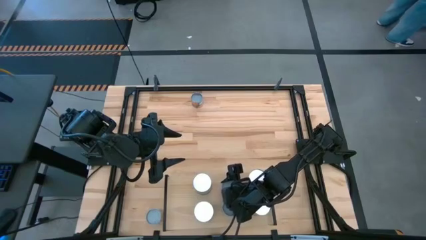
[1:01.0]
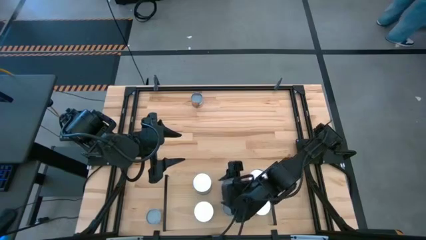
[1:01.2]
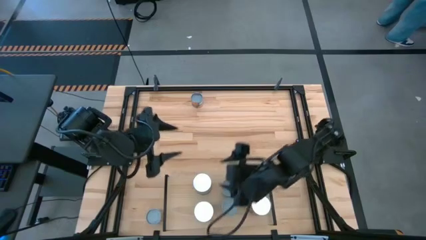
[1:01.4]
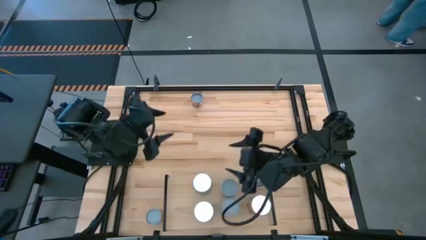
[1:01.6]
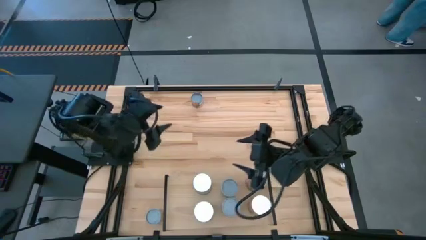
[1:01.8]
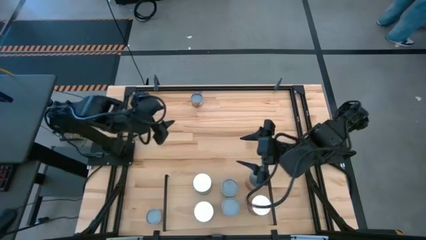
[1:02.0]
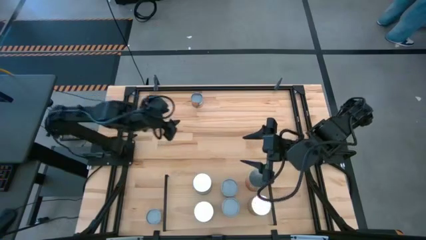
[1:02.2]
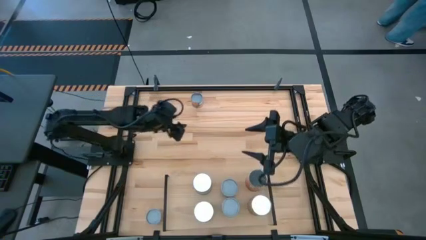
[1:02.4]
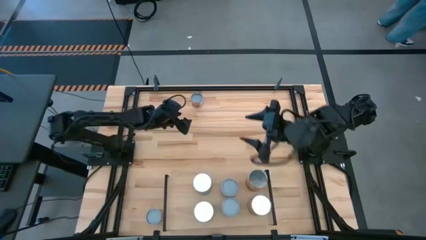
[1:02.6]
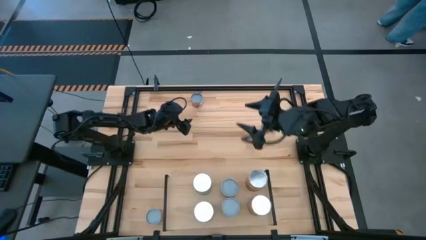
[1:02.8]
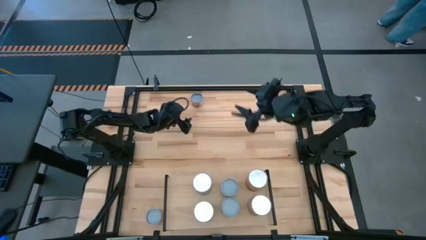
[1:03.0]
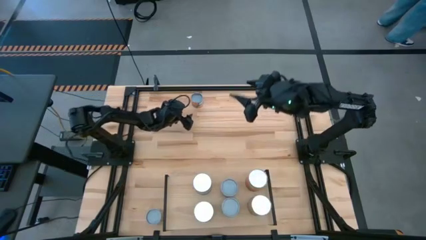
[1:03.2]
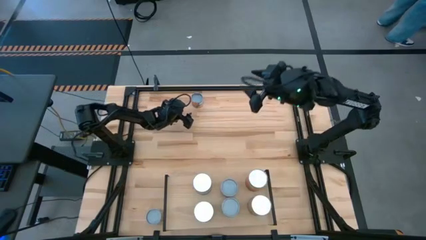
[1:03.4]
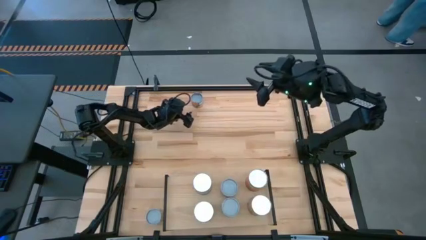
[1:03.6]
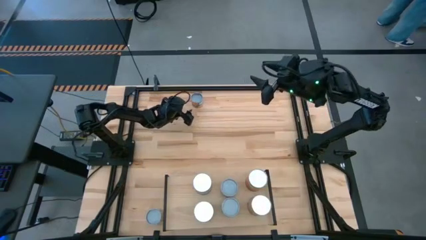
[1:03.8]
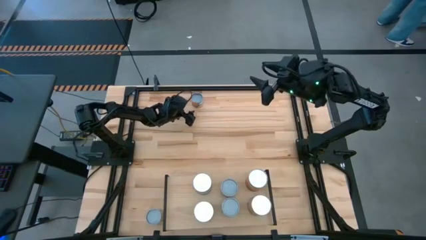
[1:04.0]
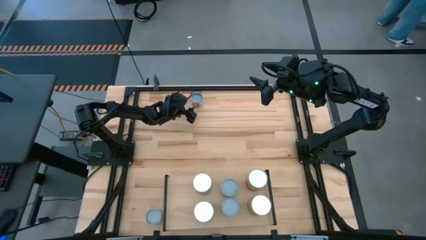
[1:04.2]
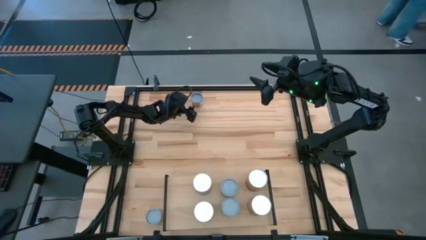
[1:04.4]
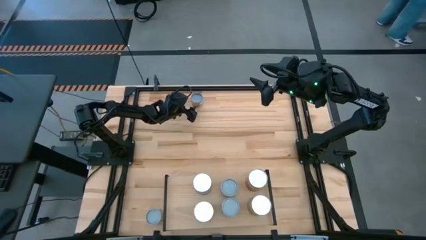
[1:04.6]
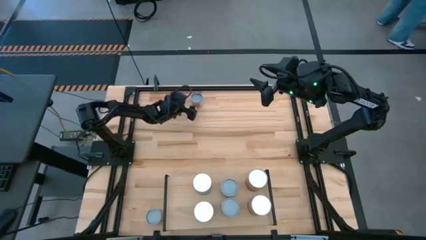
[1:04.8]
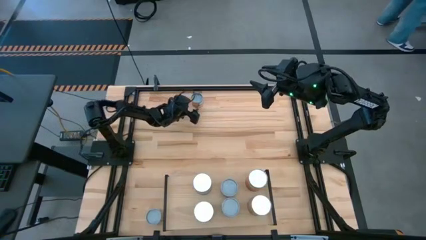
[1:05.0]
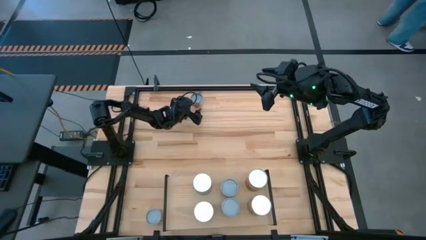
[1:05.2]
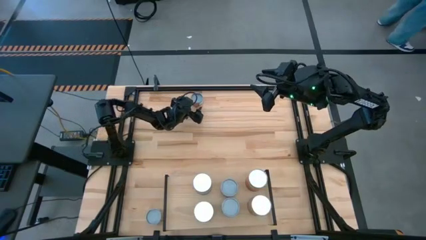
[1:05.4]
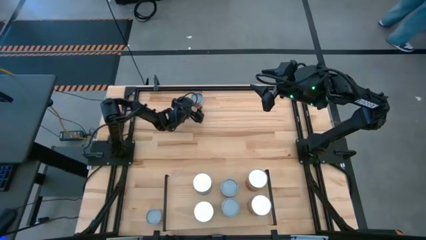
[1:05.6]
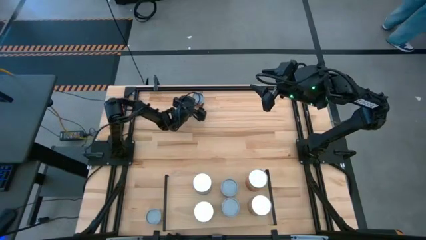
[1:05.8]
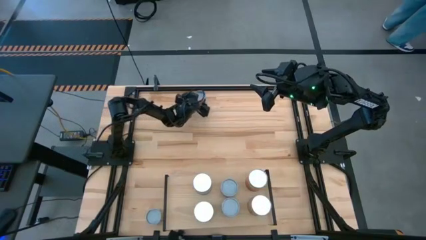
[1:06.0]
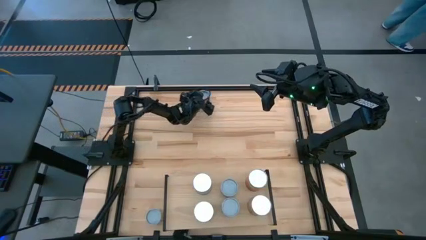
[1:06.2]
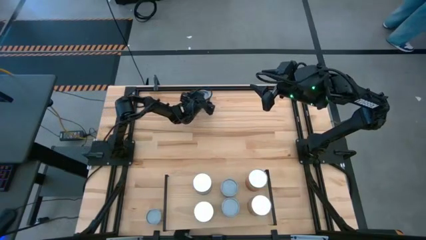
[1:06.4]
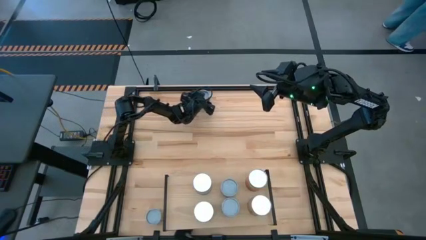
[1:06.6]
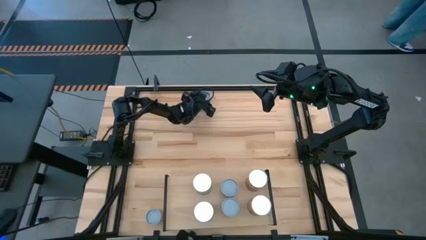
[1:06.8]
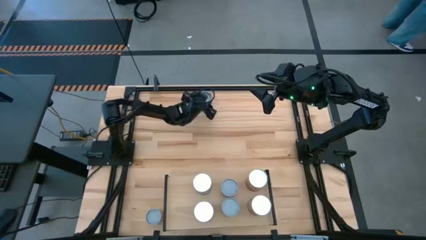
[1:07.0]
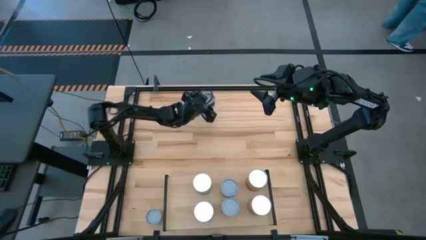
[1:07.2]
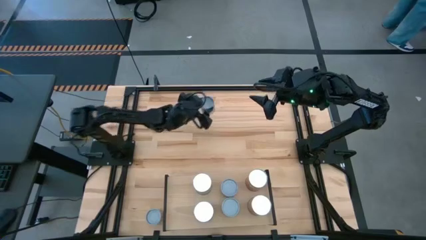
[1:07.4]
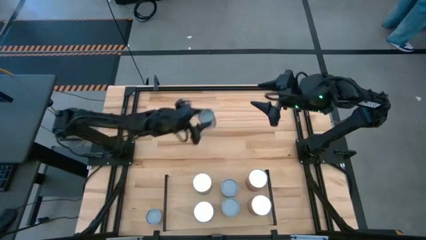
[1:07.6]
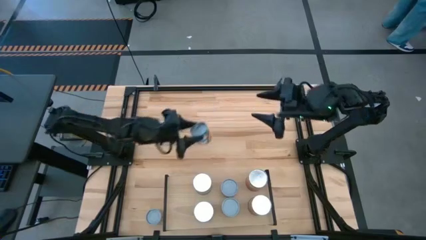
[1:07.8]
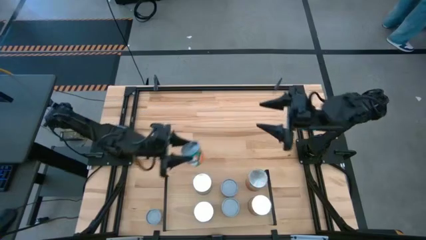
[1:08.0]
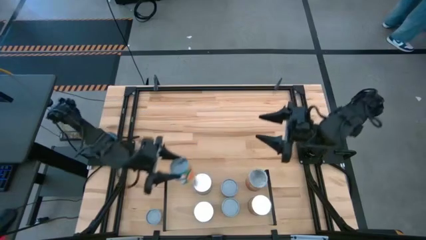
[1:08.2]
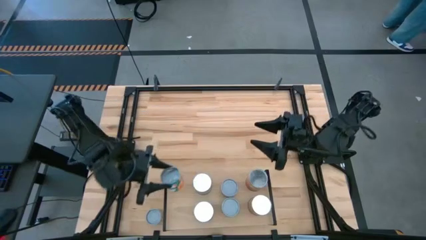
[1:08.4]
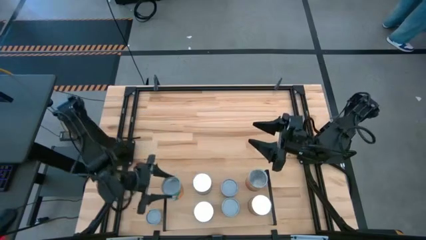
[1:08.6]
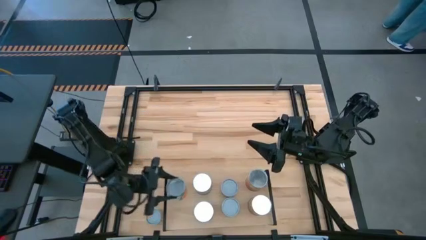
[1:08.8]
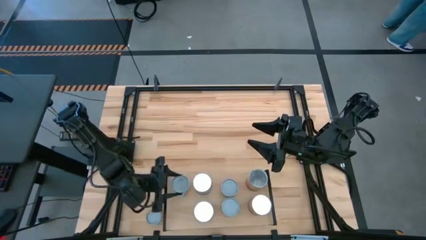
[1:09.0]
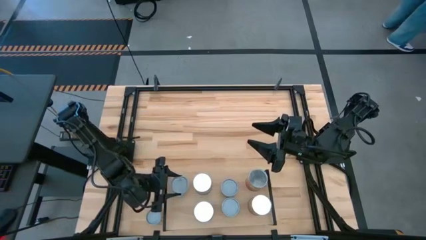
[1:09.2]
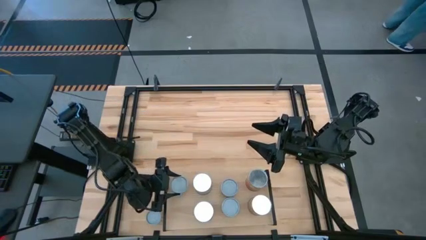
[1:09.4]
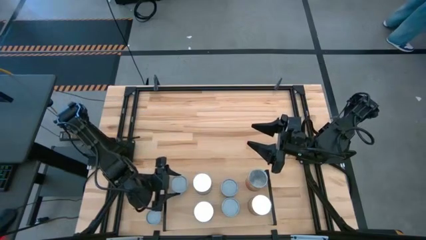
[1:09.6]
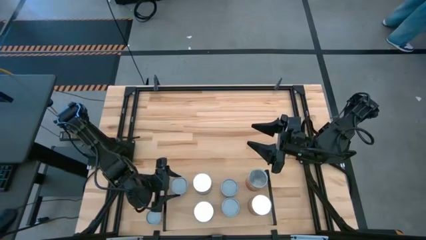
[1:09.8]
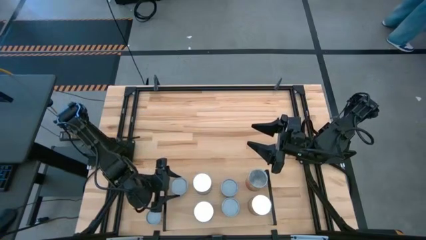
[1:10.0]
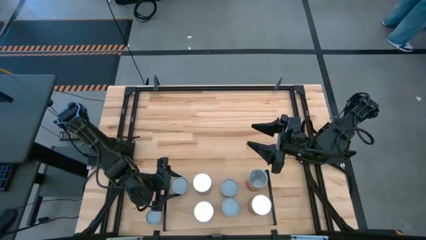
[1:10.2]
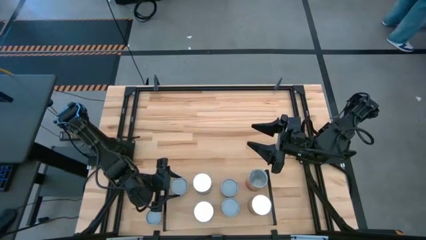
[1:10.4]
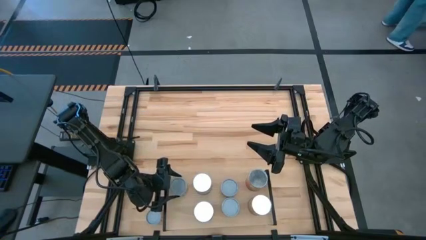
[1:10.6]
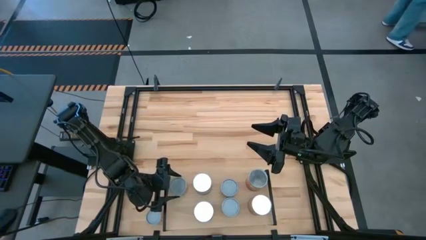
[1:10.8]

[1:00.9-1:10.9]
Task: Pick and place cans onto a shelf
Put the small canned oranges on the shelf

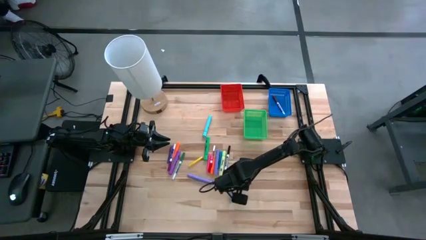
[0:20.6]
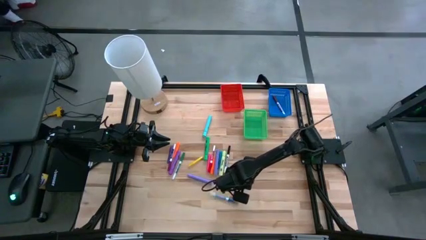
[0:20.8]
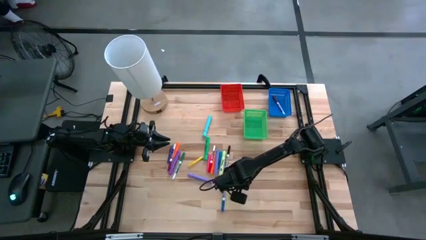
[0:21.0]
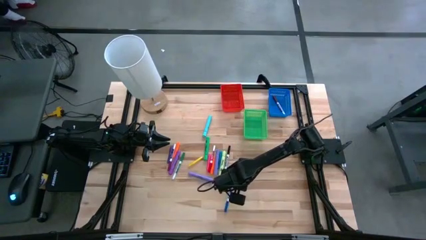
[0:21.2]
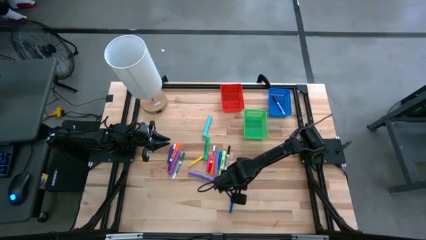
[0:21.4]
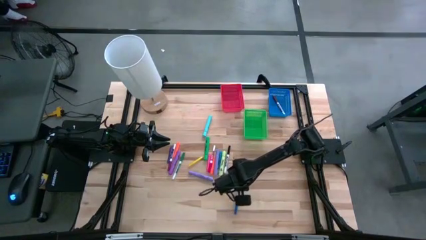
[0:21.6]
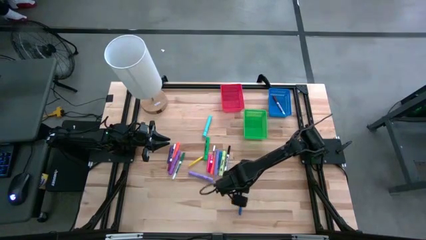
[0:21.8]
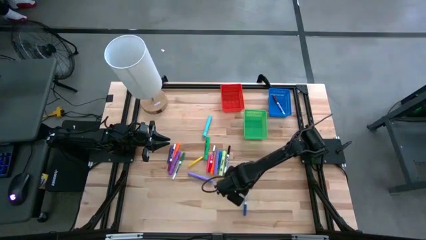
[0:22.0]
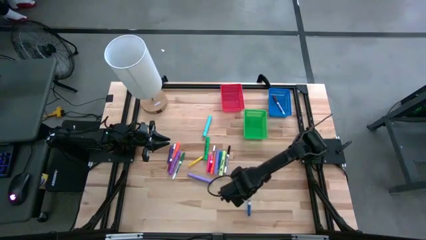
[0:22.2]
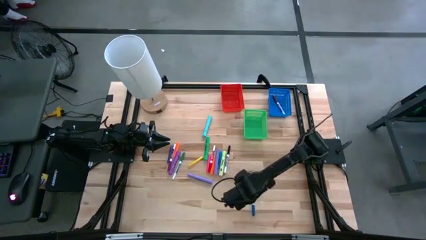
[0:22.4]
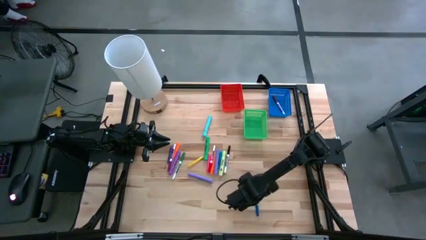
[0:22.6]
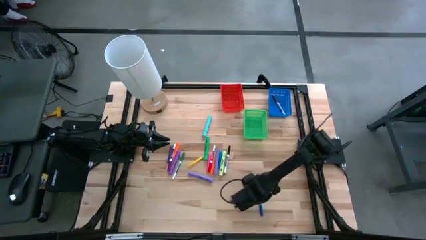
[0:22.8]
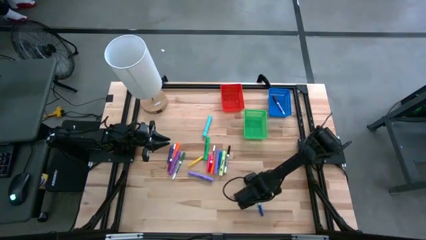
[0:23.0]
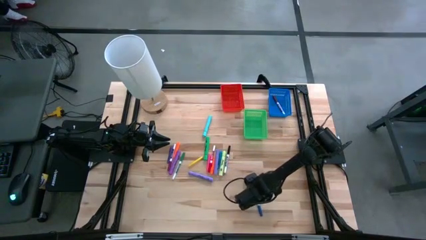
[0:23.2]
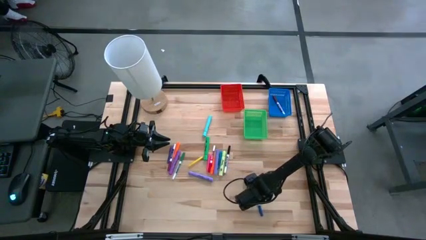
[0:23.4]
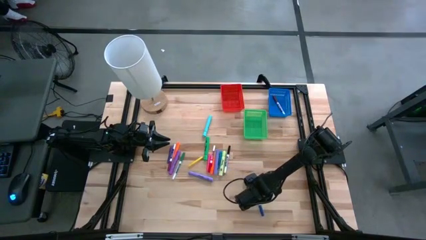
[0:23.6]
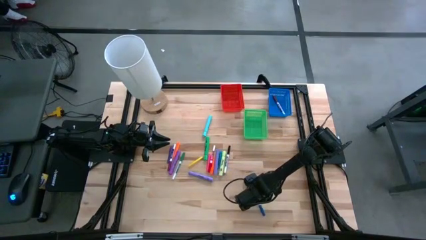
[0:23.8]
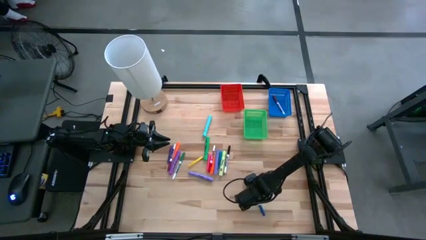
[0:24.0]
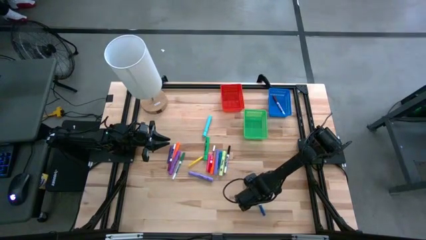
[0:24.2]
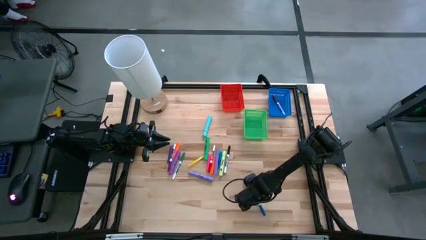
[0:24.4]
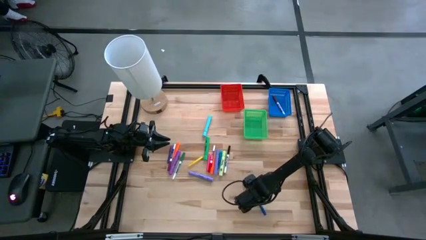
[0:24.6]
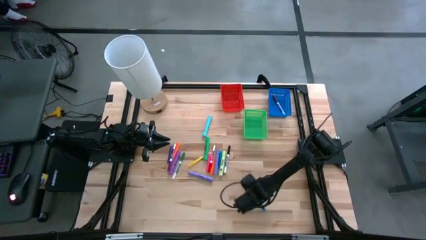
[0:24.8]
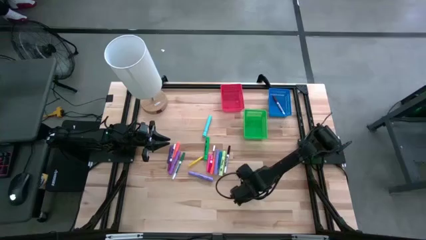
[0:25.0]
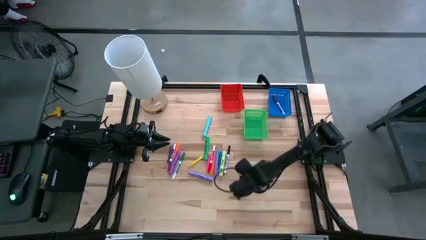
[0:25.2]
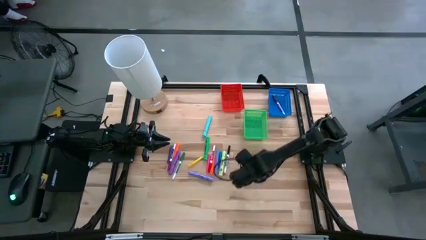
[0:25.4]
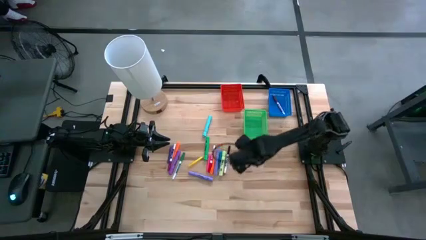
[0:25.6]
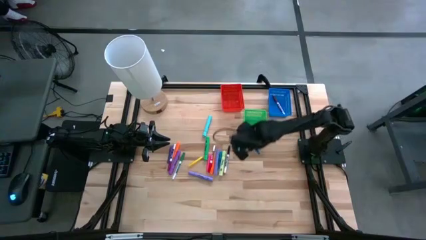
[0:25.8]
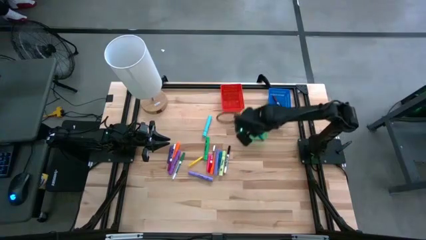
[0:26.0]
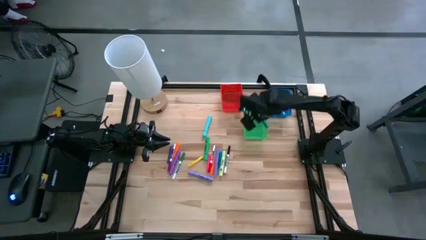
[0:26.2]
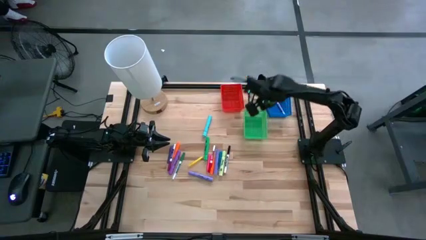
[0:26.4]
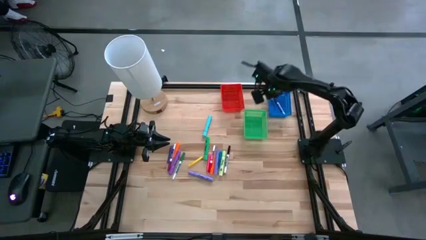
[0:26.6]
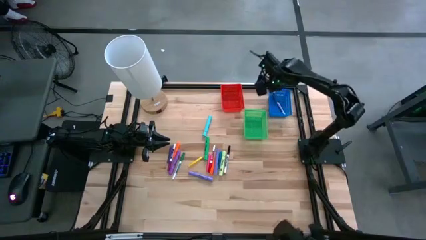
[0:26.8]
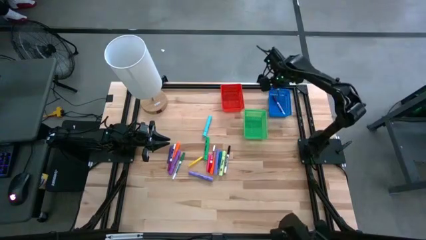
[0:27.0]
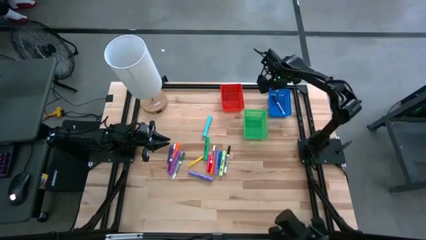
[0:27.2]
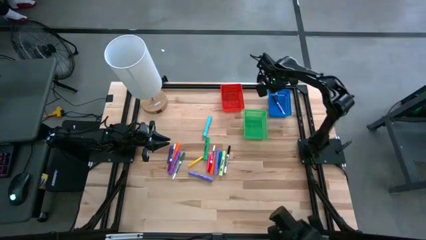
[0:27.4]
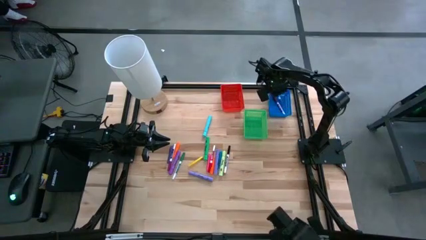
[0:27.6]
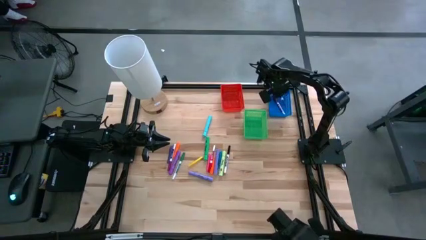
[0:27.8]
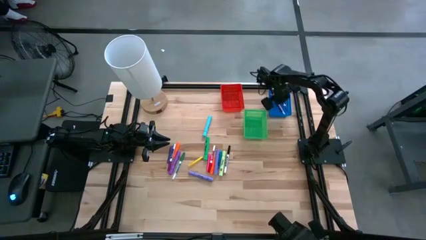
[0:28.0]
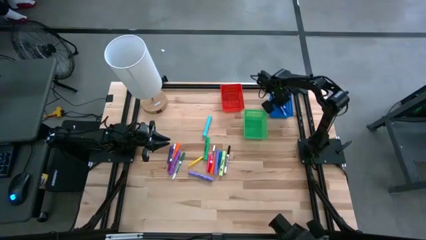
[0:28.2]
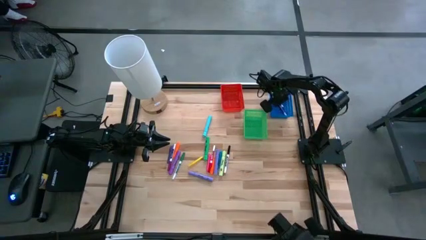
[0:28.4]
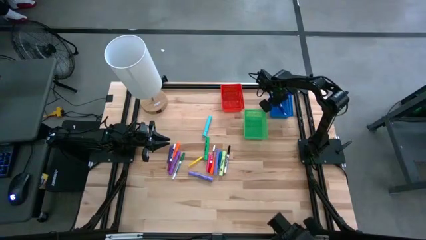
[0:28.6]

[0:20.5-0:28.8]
Task: Pick & Place Markers
Put the blue marker in the blue bin
